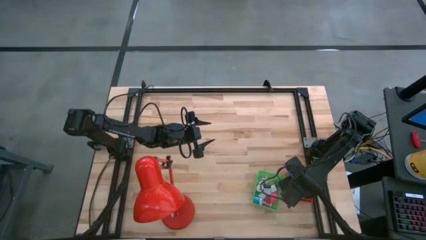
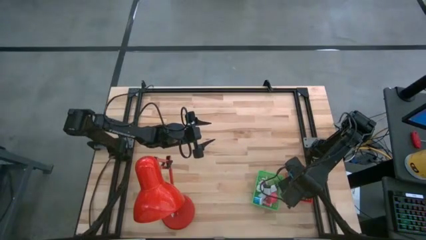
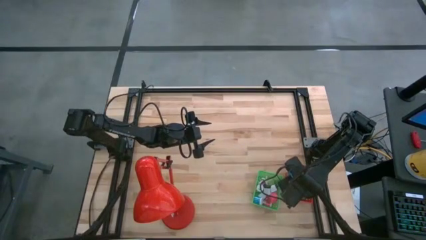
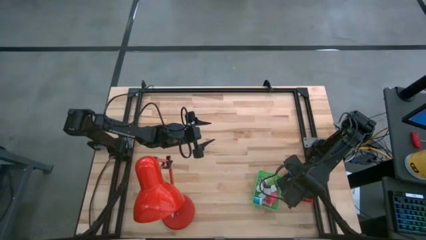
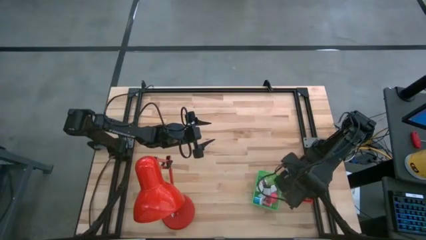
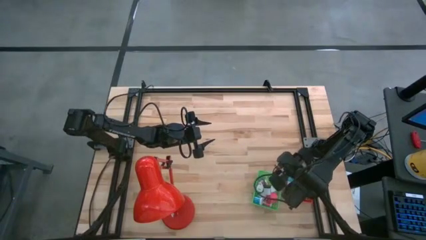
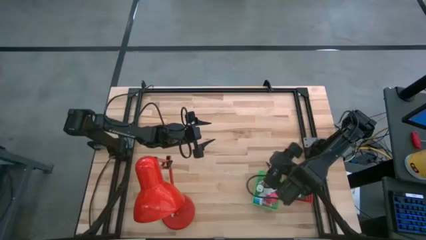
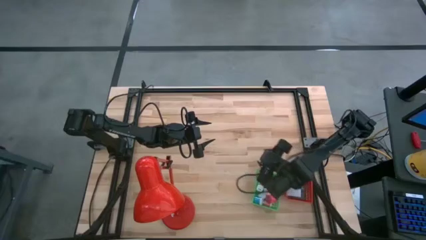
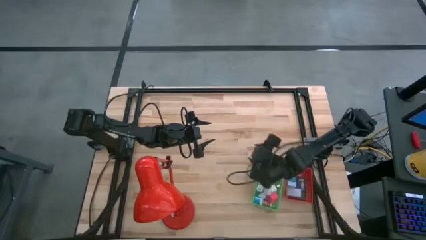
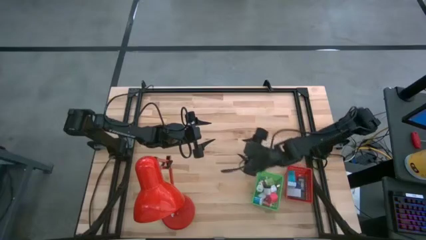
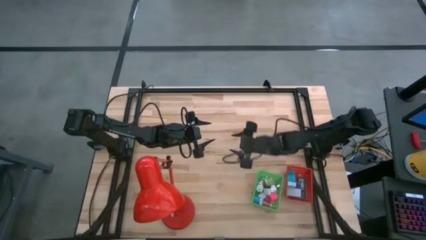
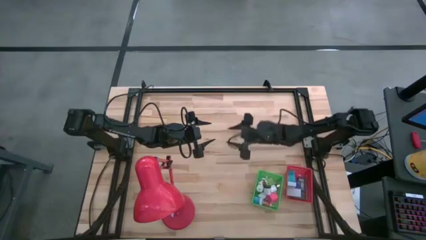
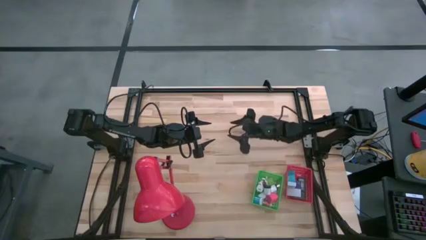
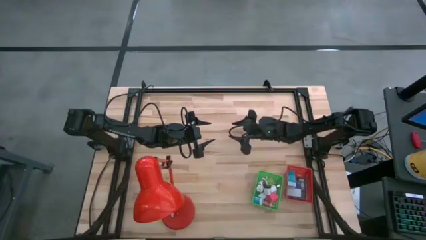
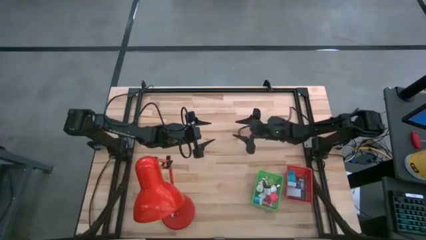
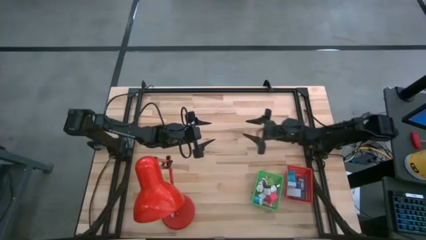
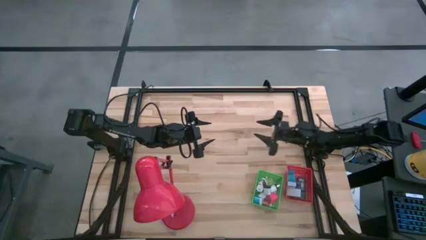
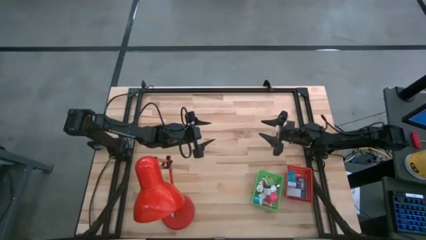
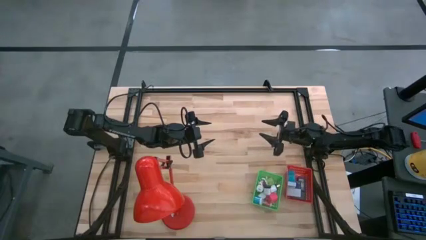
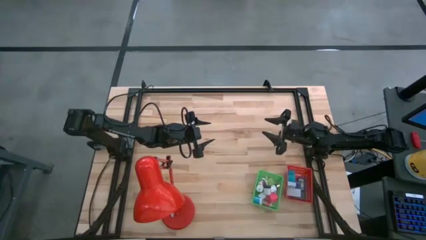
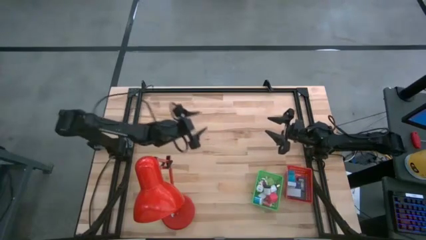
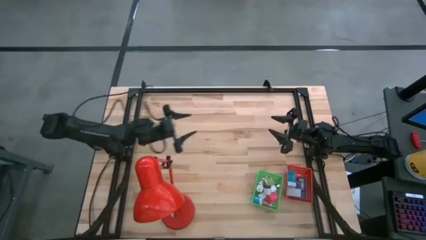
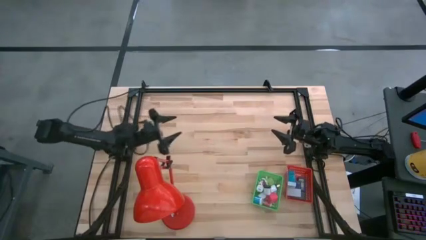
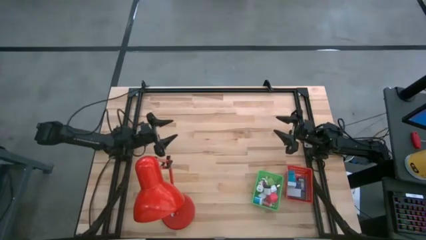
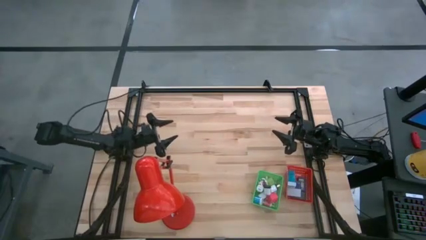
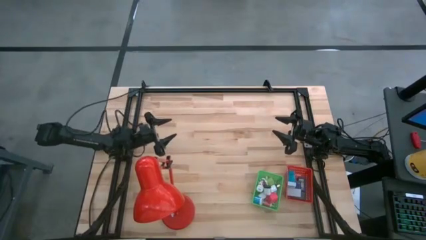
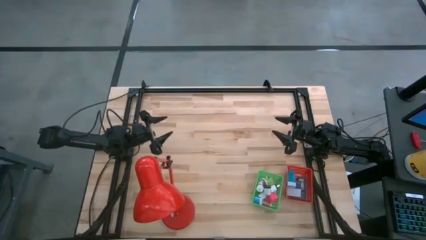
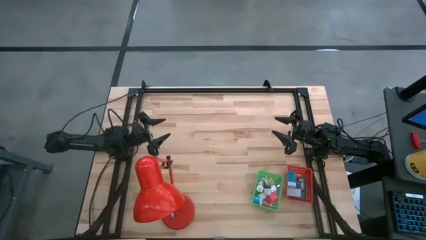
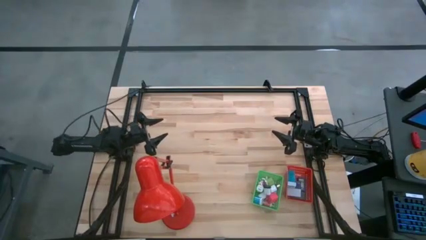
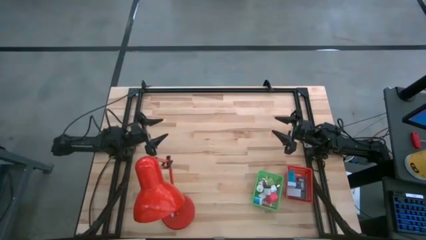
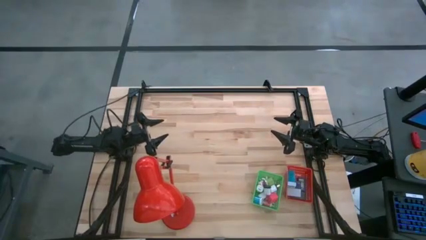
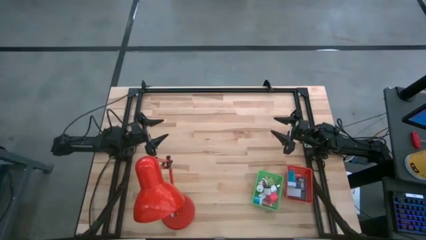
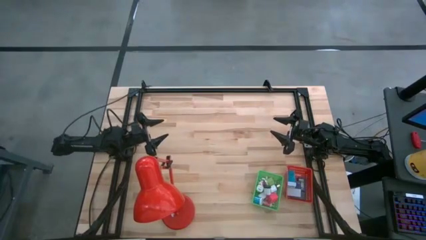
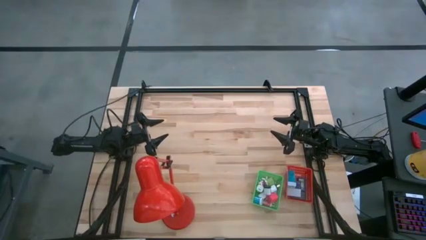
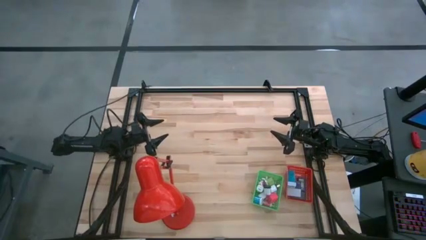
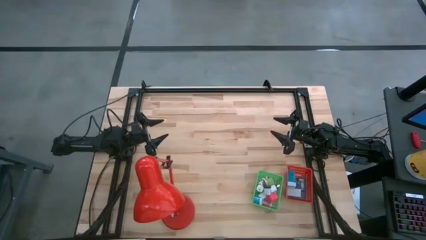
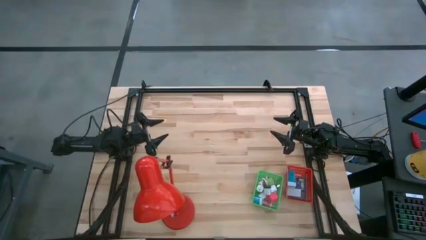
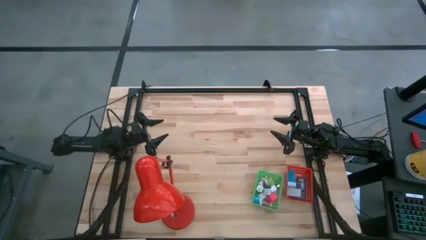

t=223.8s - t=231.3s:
Task: Pick & Place Office items
Return to Home Position

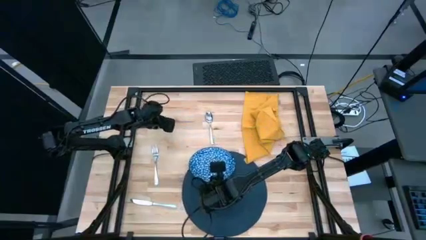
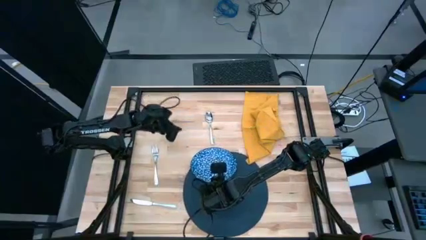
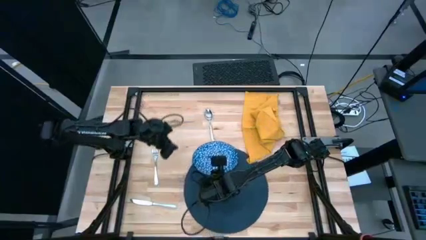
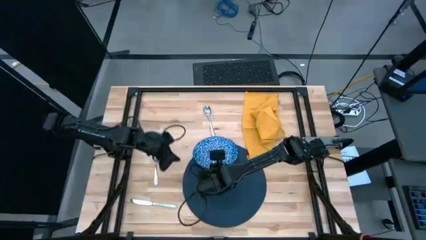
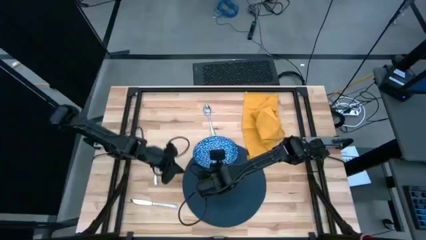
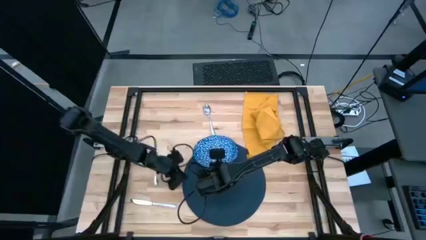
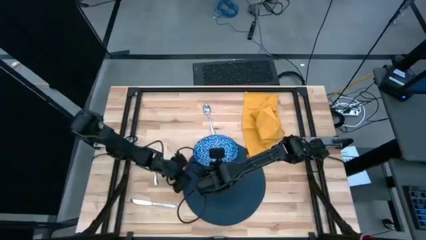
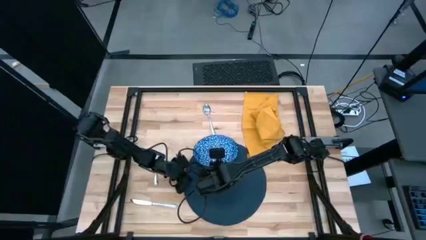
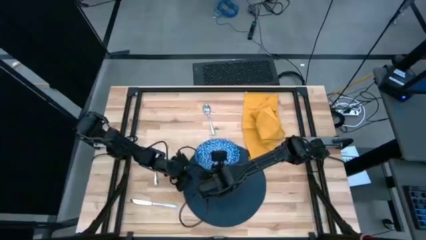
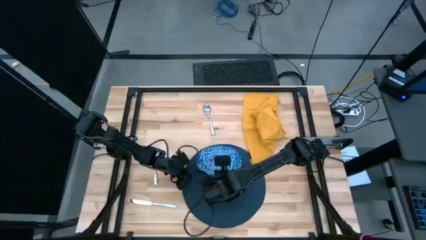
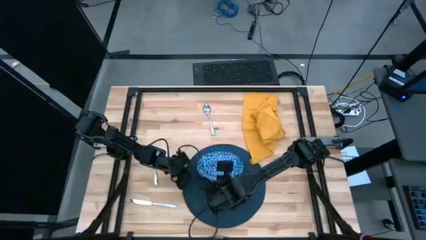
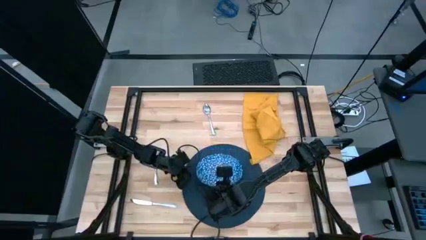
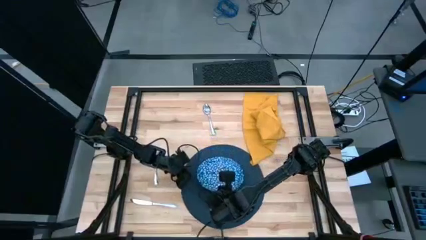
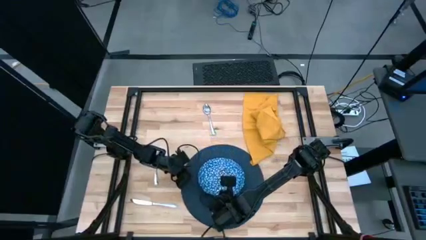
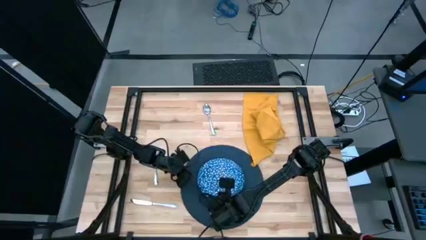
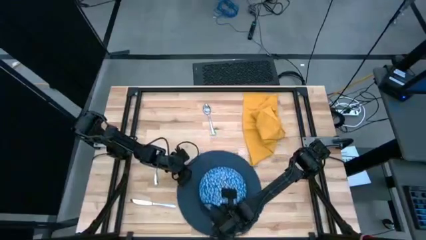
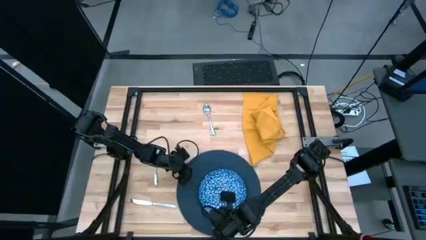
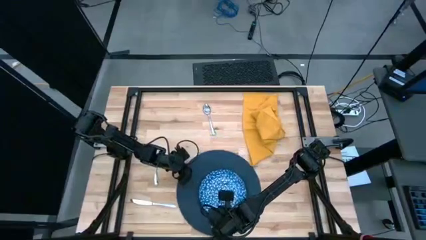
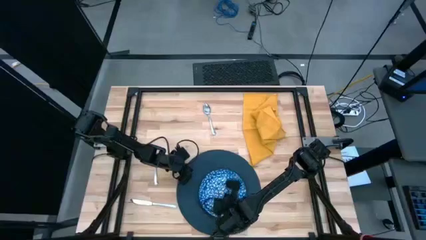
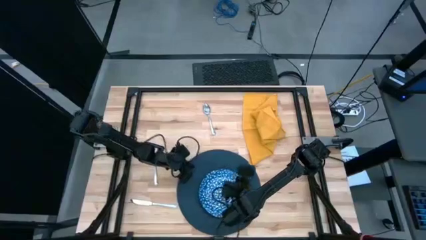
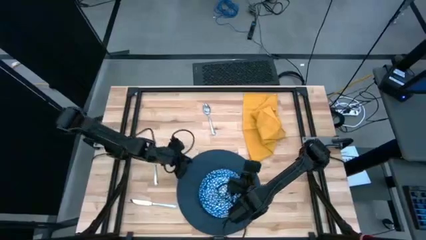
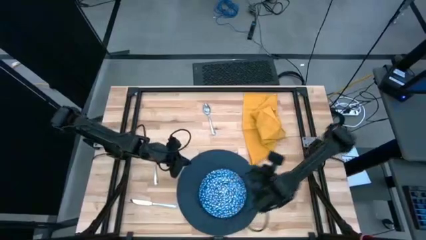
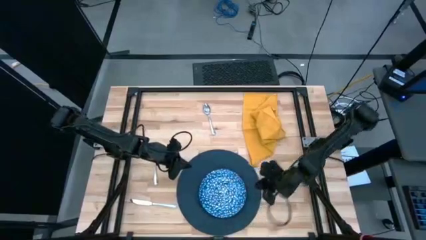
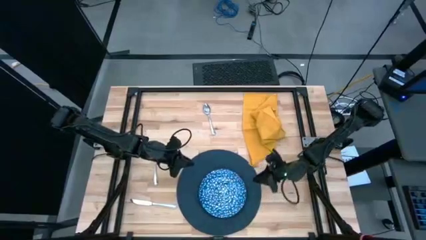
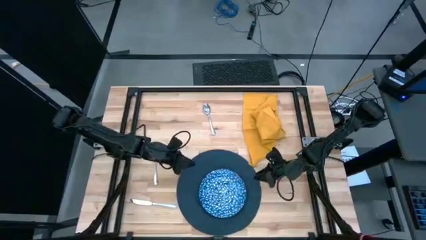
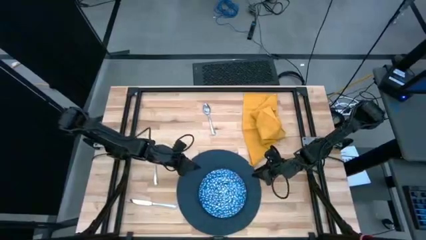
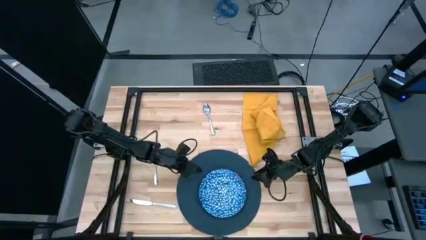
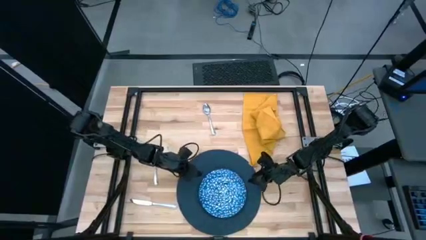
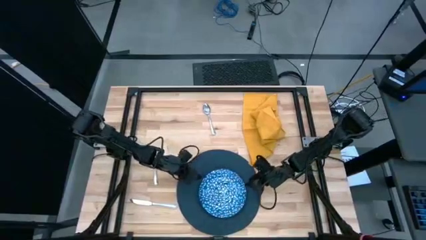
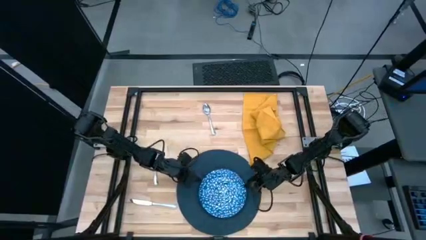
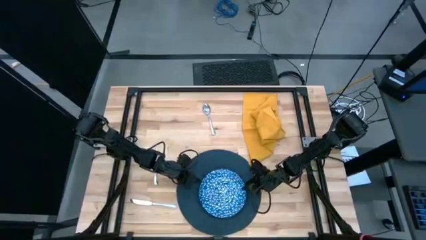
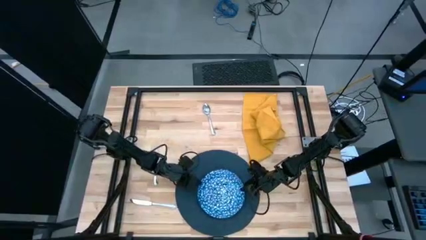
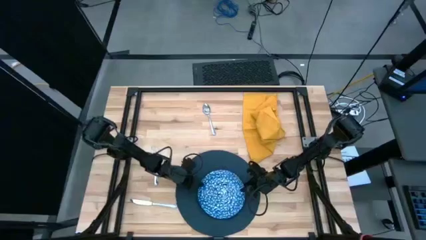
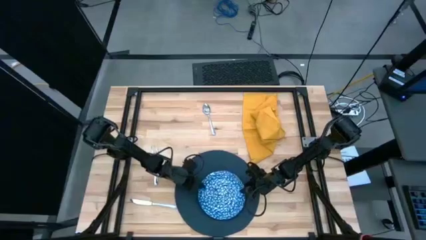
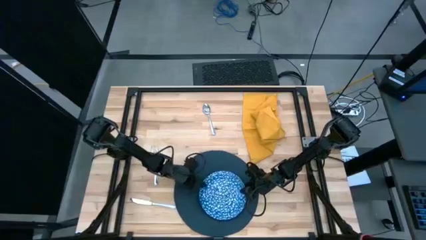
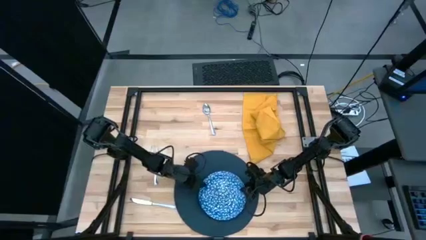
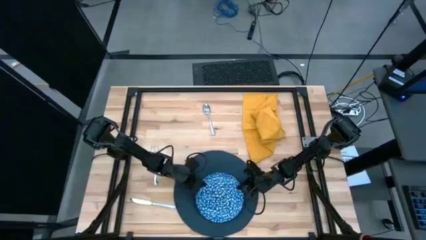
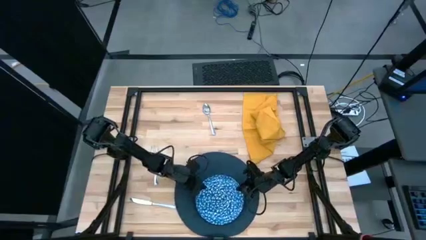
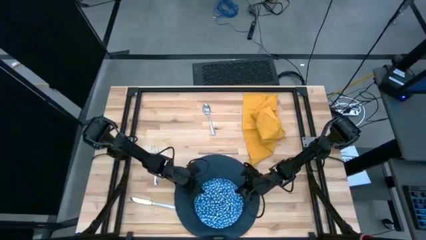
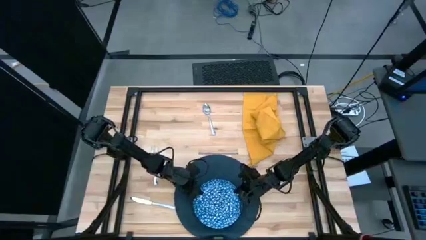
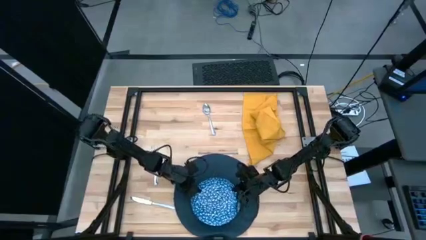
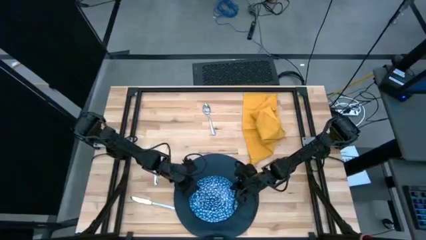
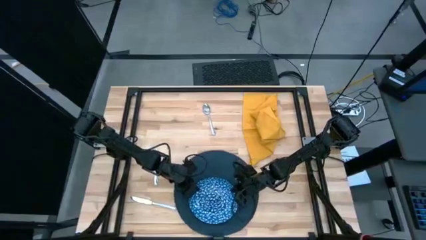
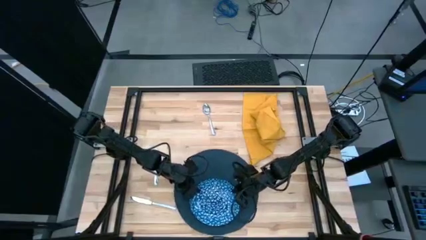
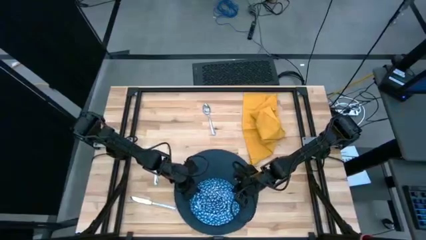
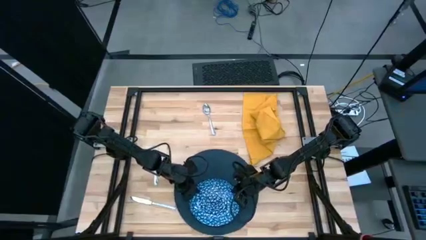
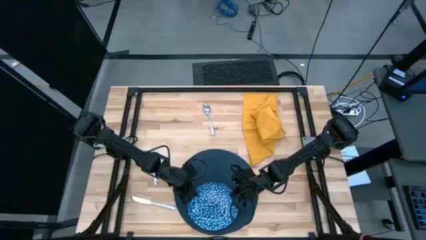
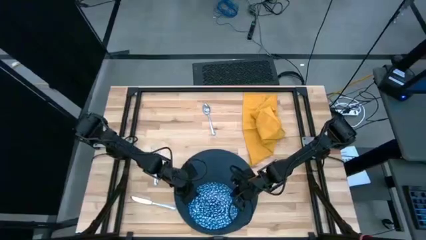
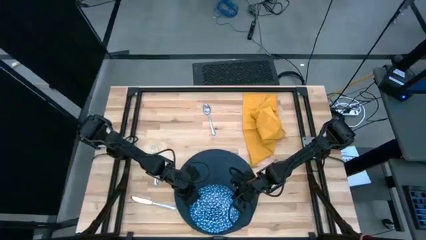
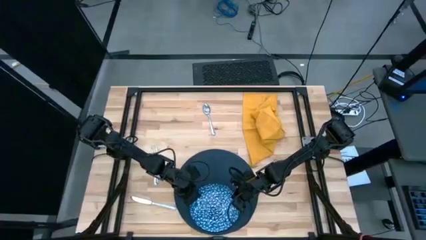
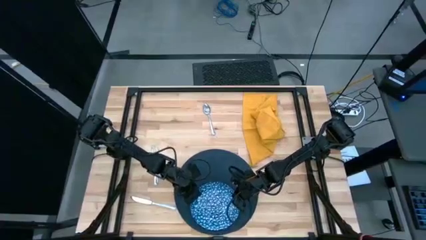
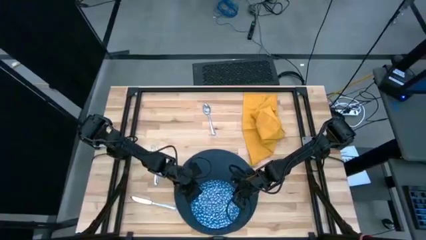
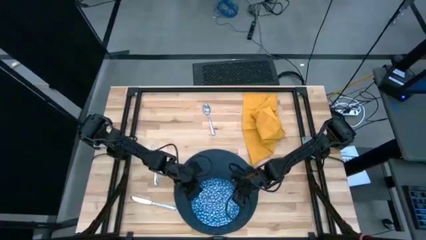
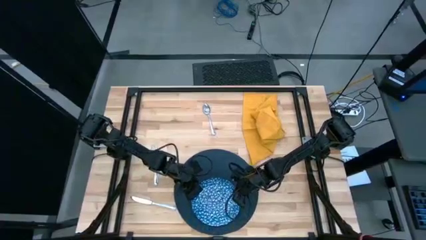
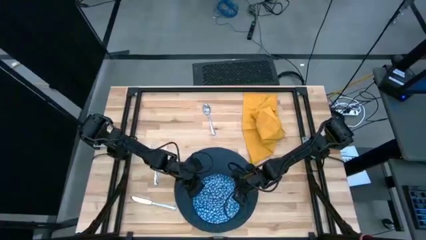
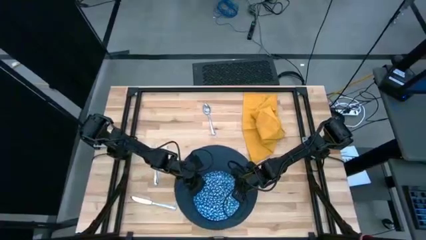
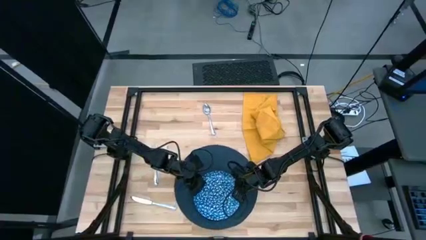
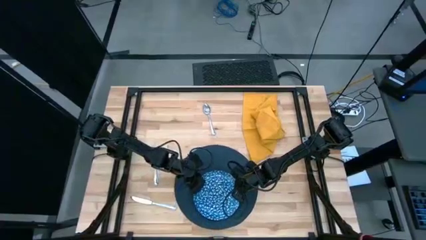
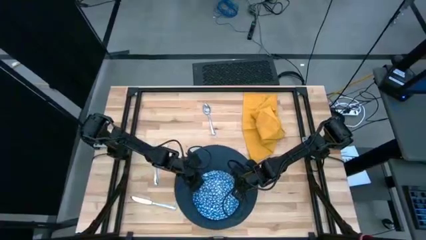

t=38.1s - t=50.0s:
Task: Set table place
Put the blue plate on the blue table mat
